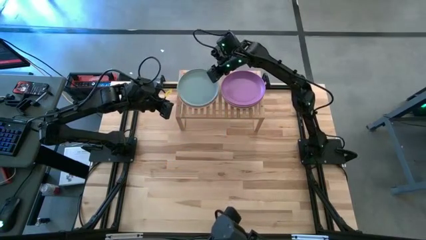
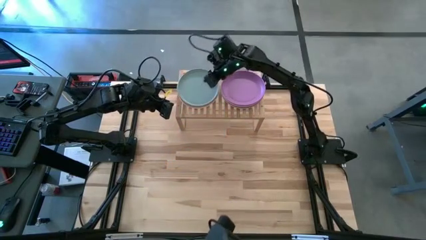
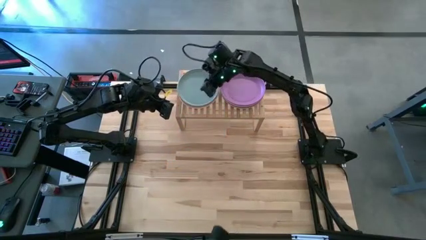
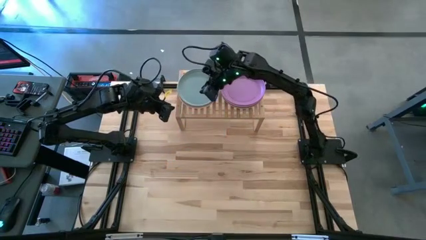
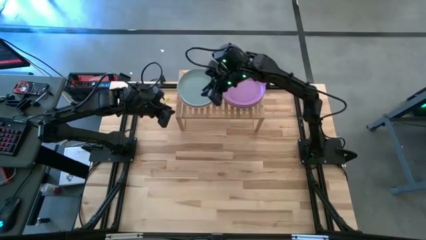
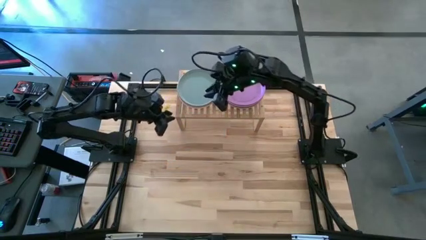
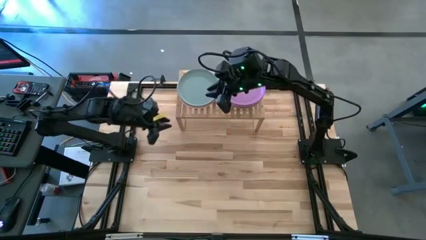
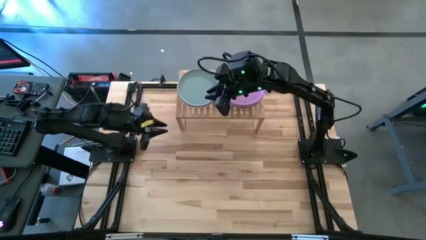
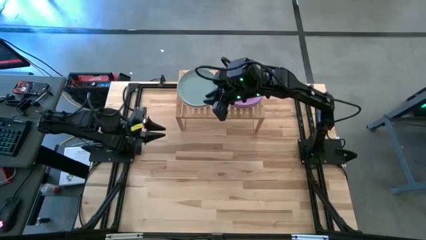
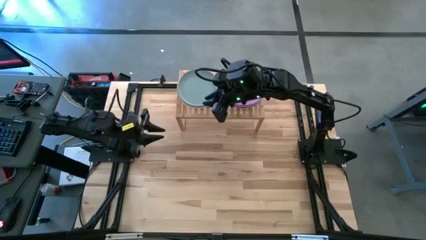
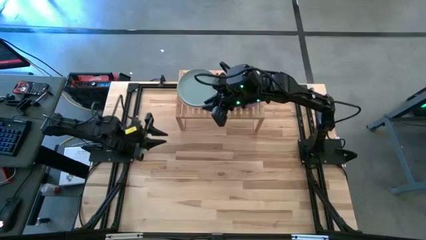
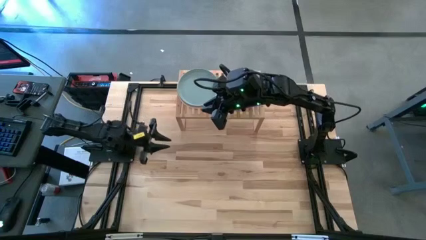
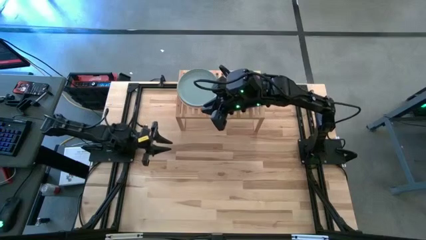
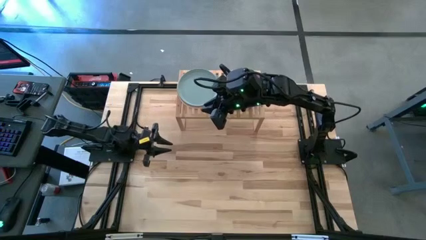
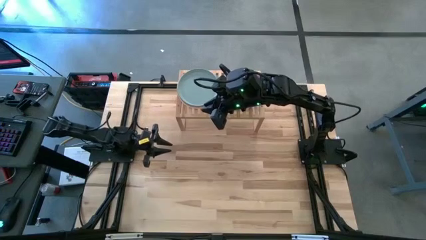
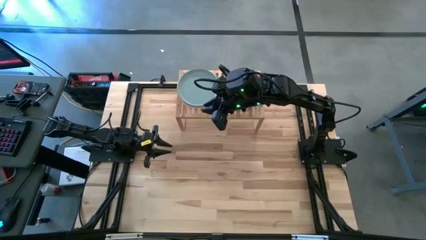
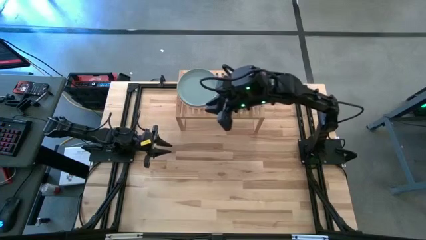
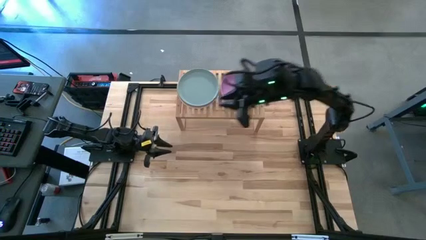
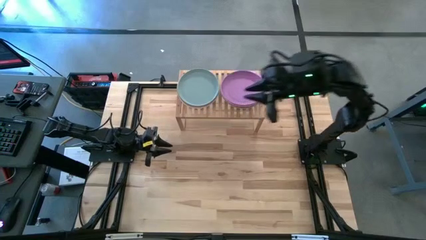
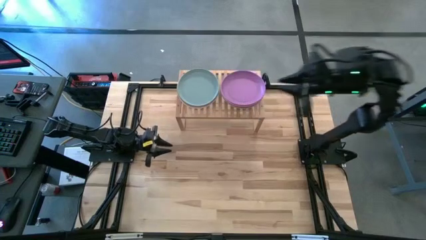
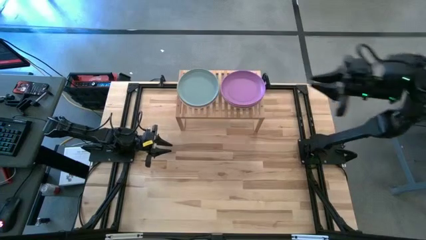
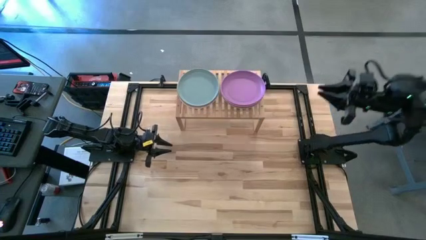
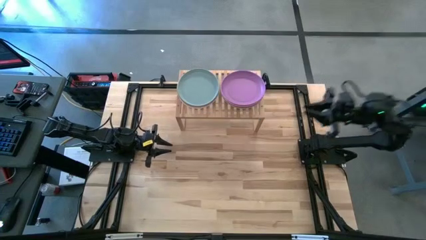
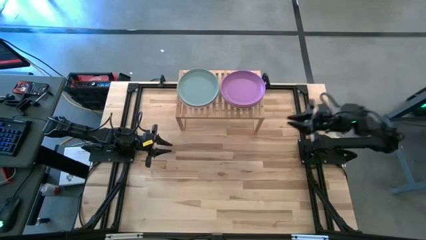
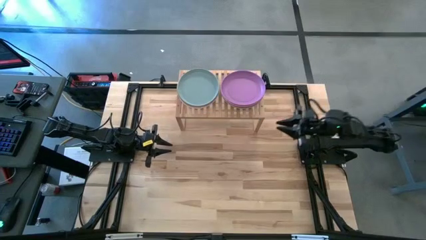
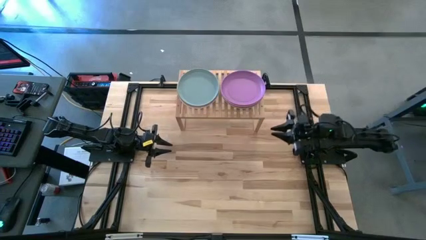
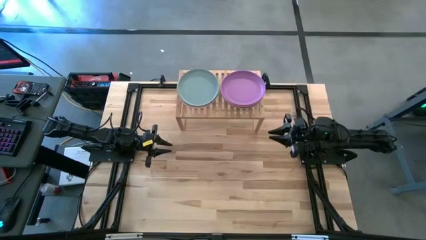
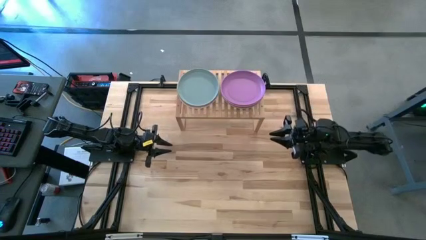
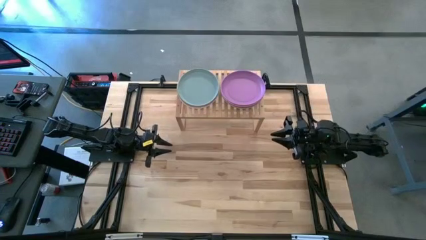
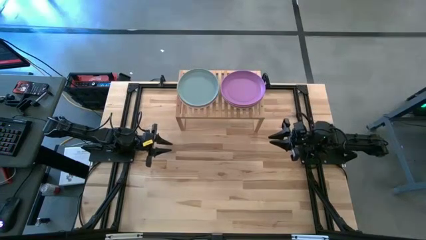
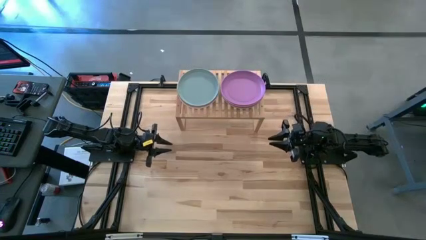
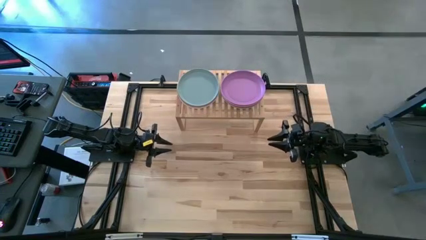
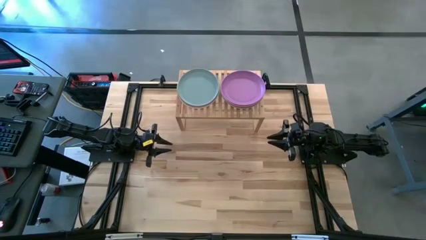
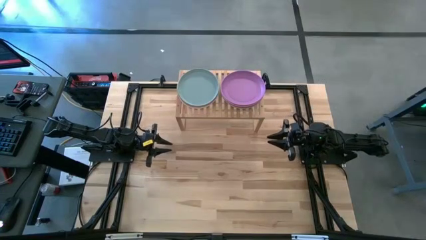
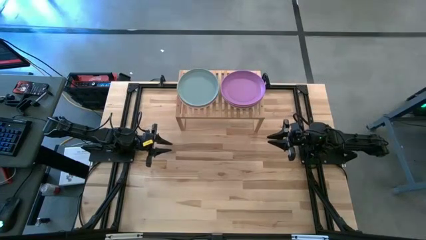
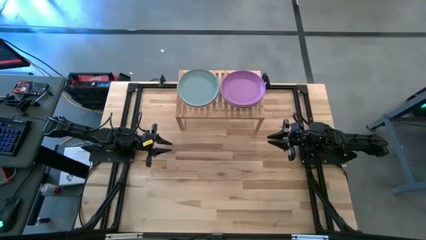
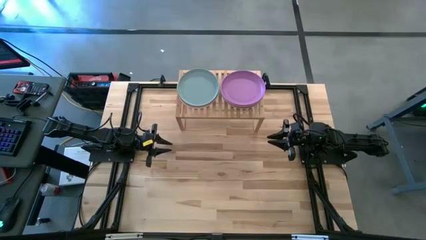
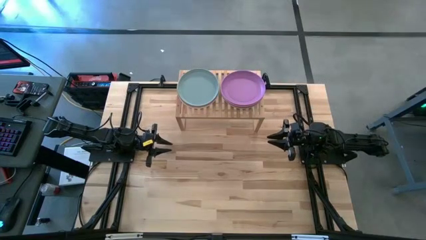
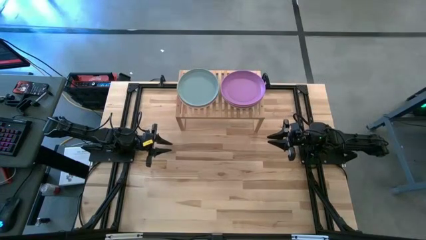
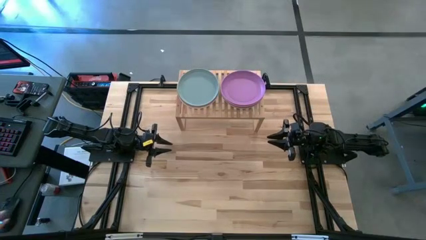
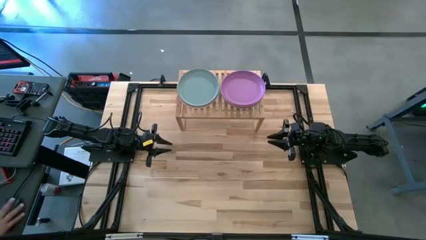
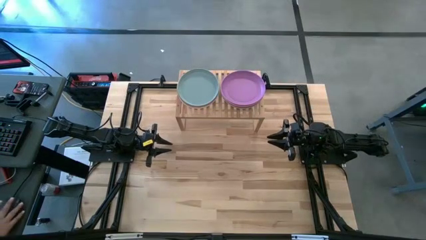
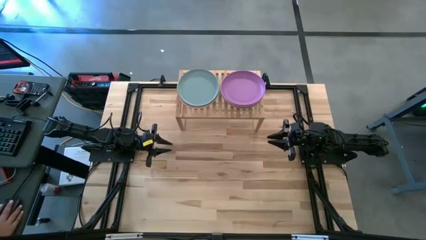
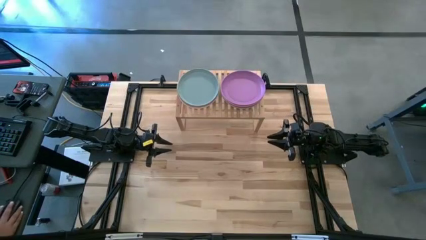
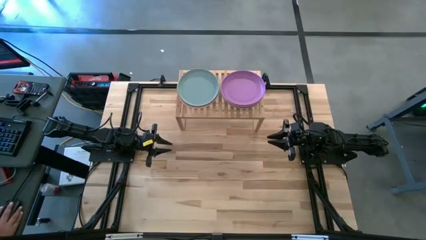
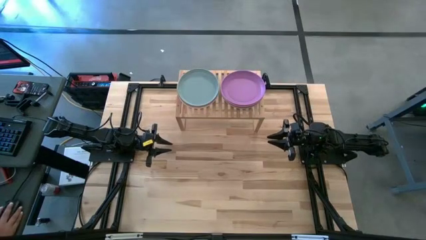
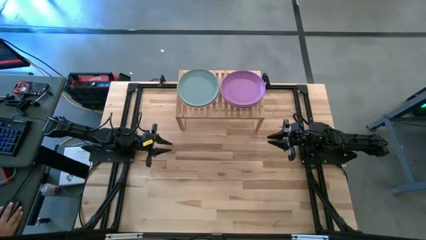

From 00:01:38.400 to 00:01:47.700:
Task: Place and stack plates onto a shelf
Return to Home Position

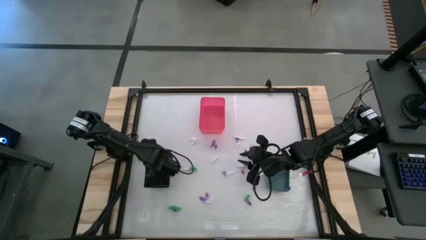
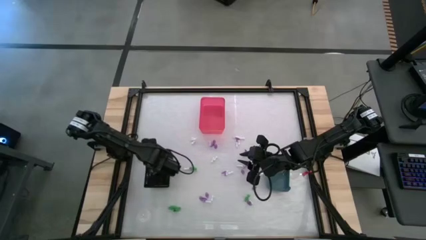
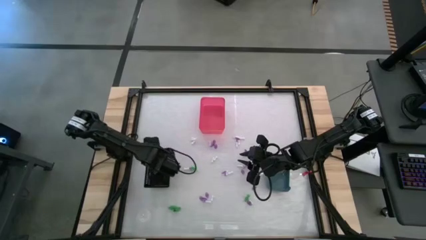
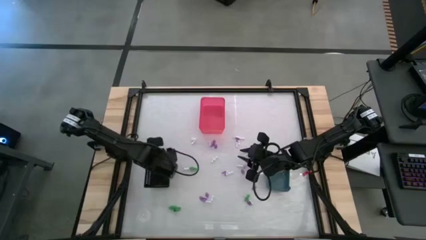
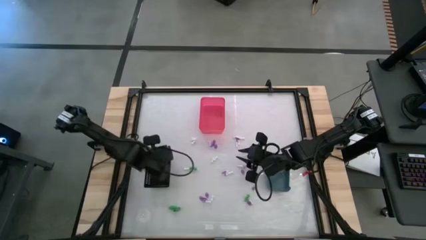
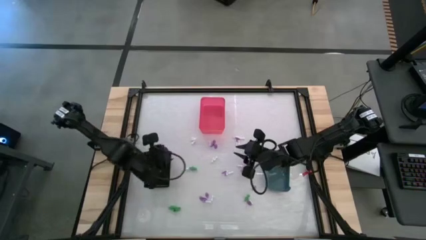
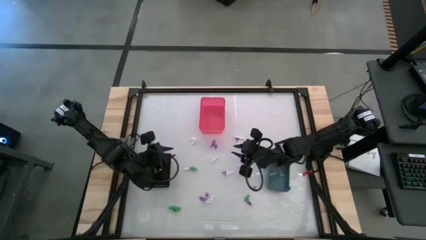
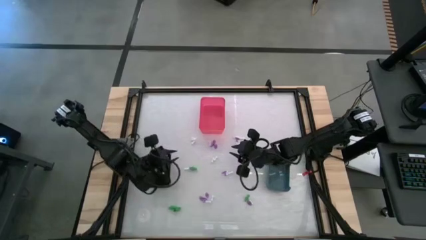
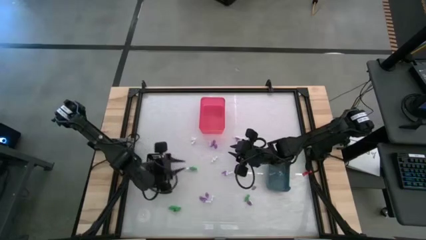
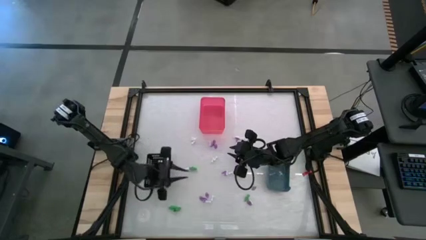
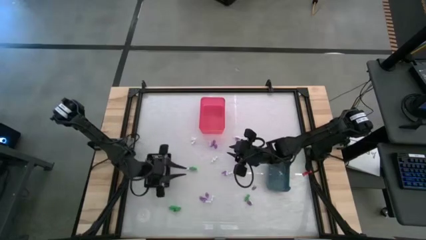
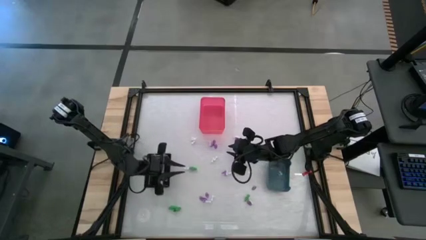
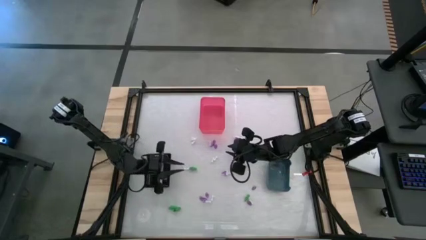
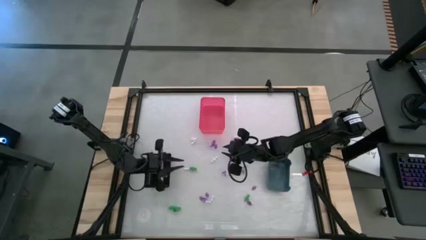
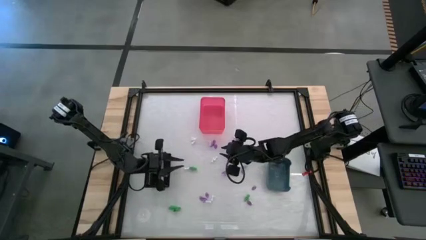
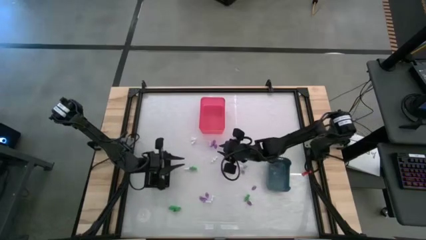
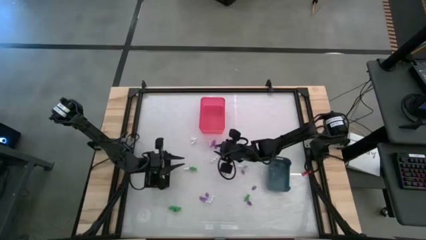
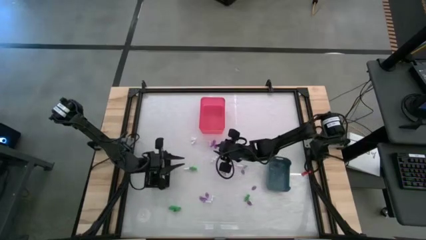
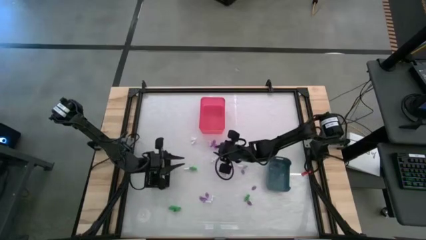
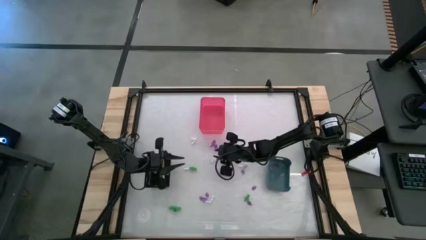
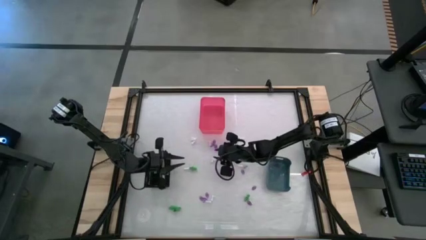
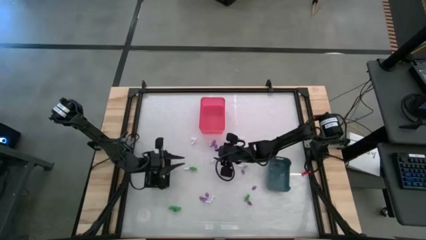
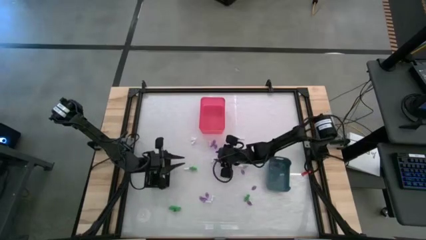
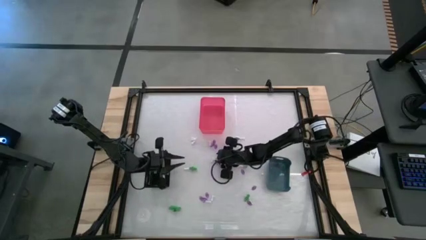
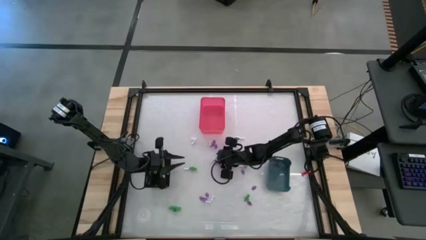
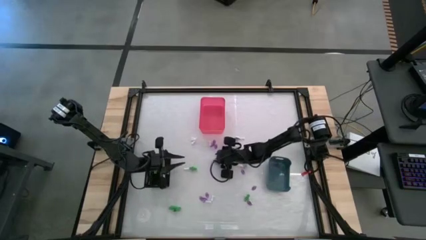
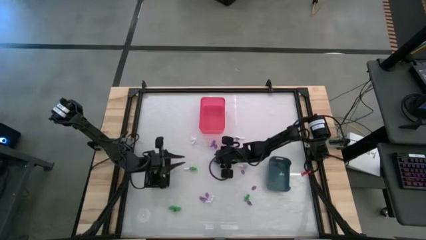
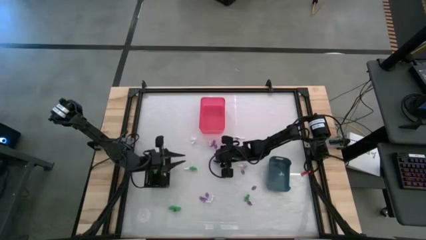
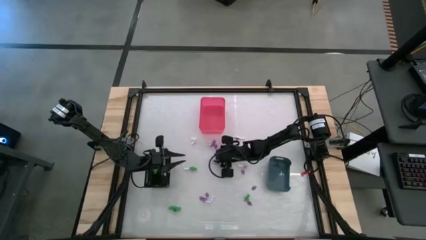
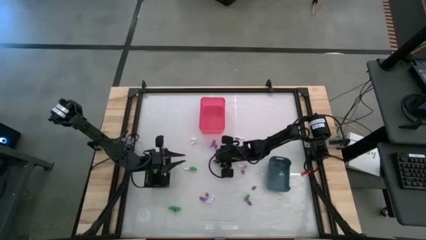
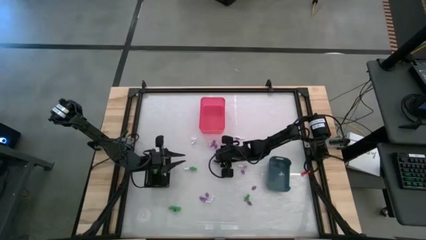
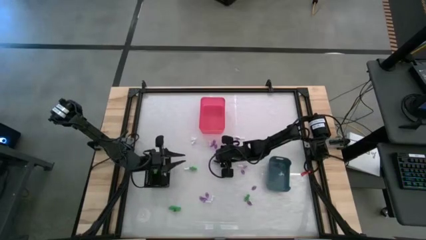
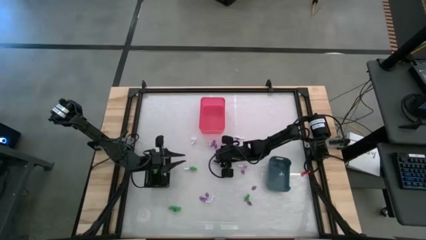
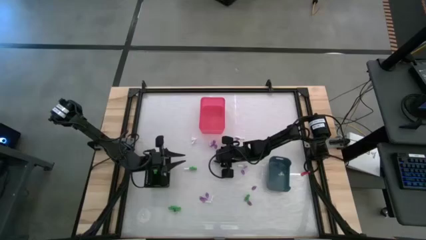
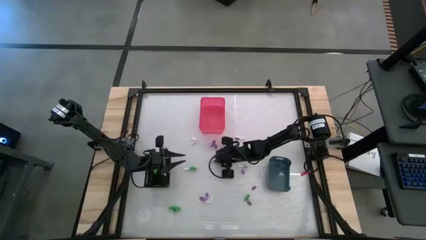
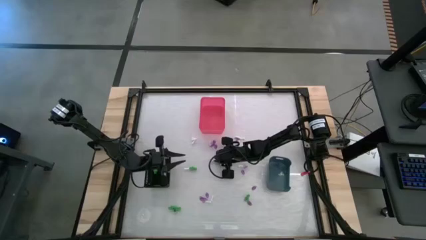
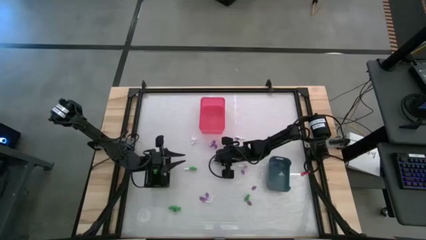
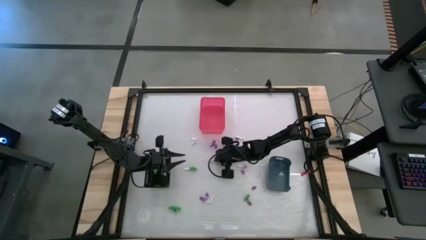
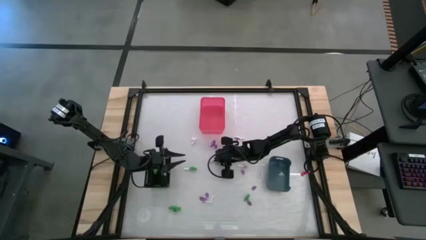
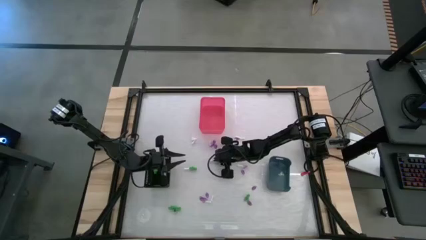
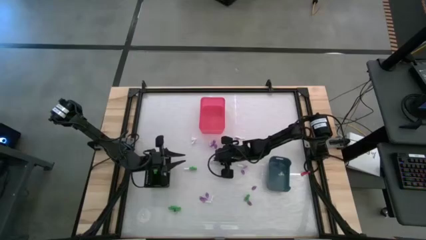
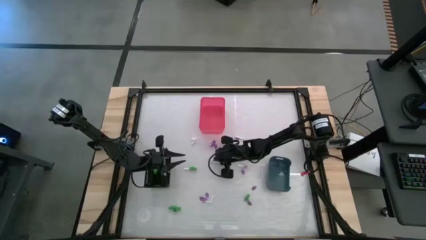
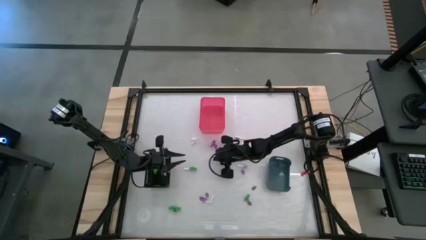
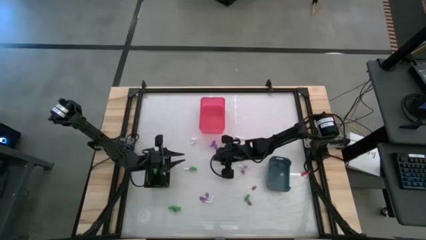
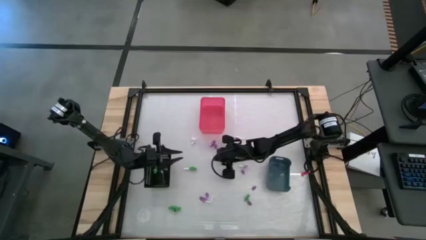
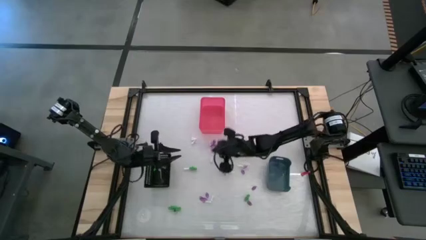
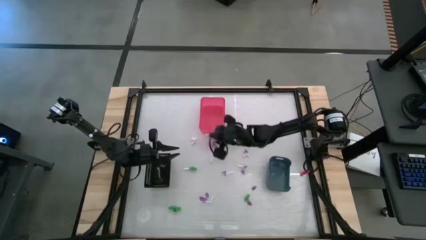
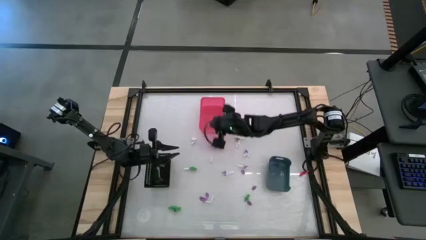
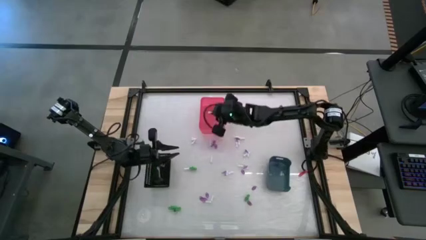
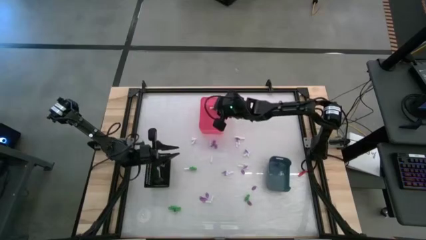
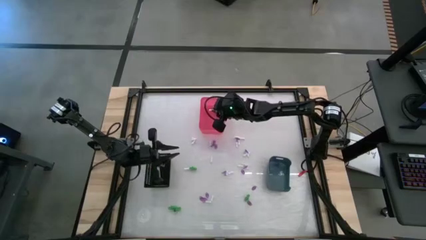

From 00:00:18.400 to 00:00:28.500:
Task: Sort Halloween decoration
Put the bone toy into the red bin
